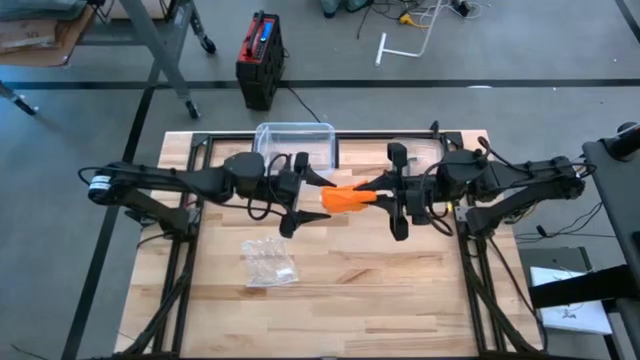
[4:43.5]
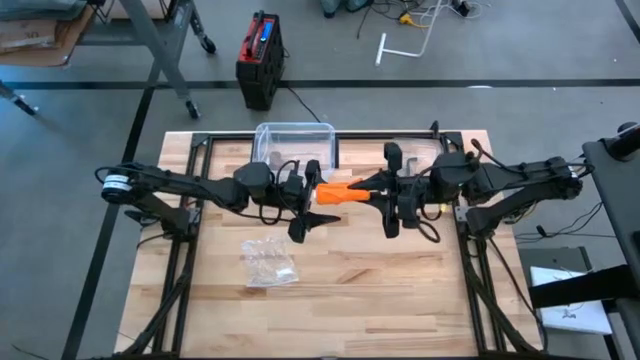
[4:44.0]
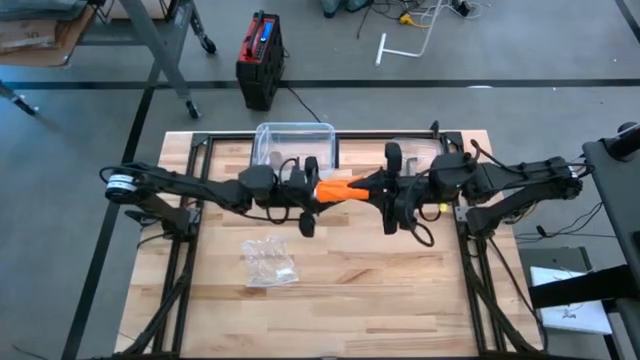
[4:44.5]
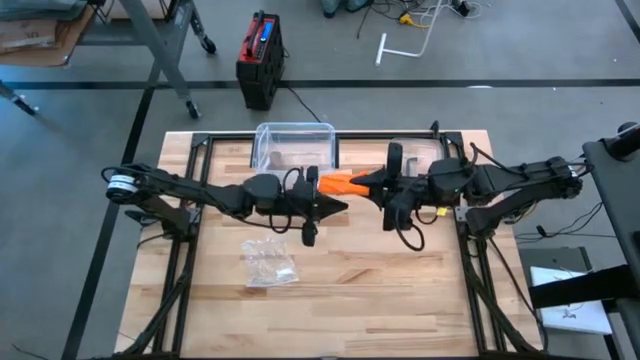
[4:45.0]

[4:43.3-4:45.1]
Task: Roll bandage
Roll the orange bandage

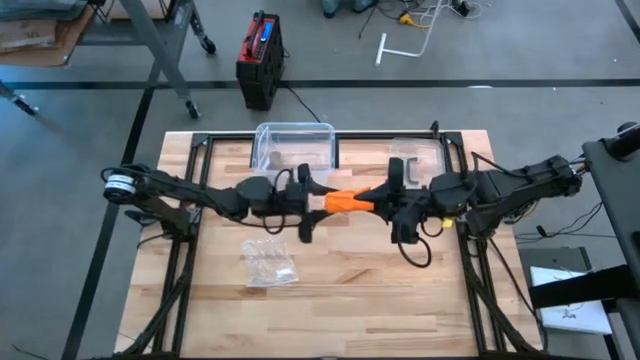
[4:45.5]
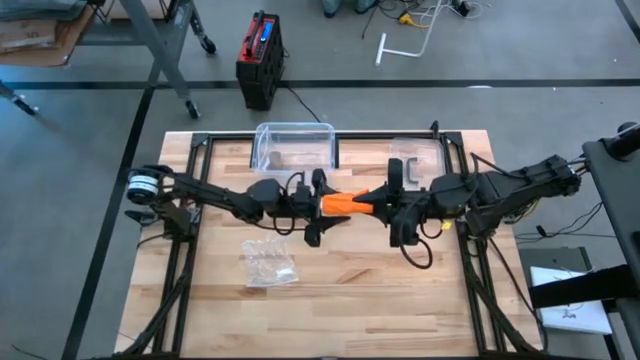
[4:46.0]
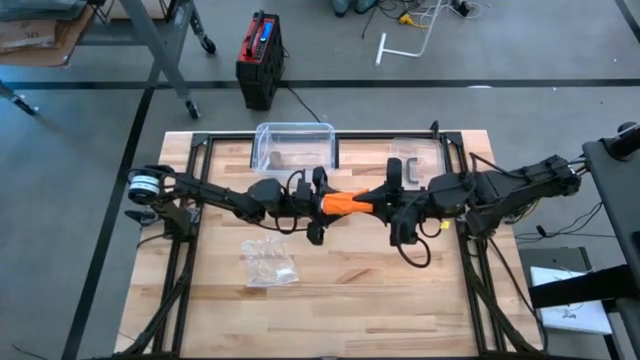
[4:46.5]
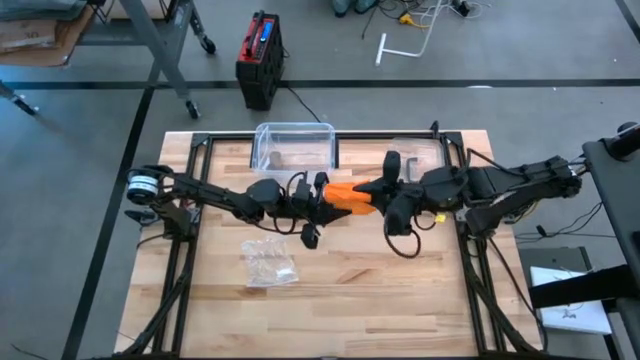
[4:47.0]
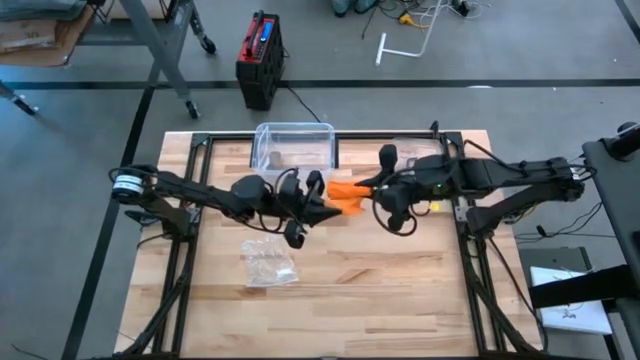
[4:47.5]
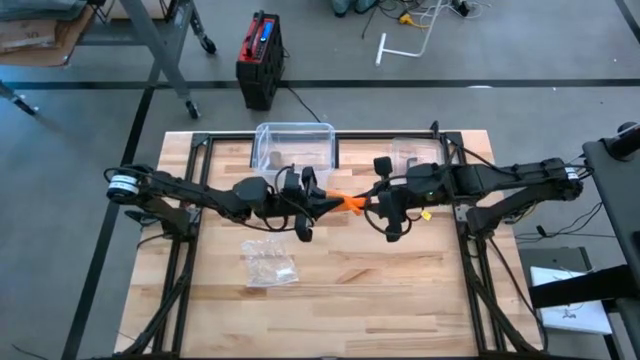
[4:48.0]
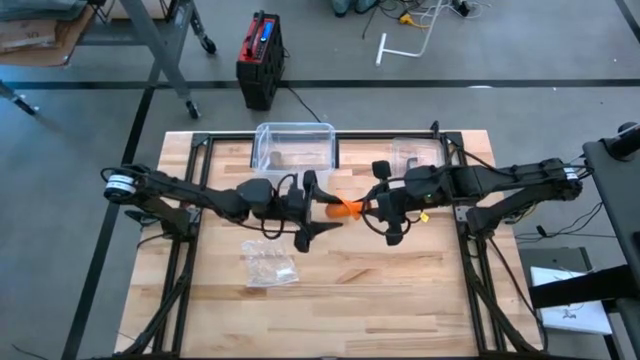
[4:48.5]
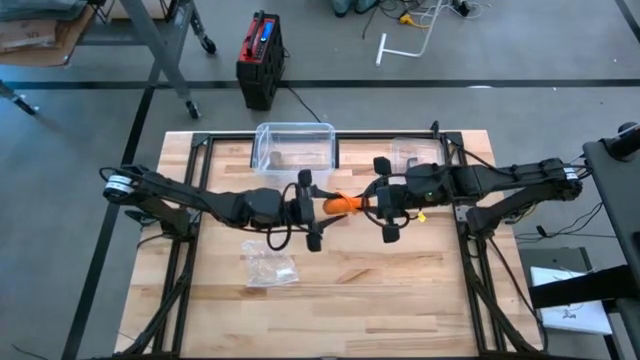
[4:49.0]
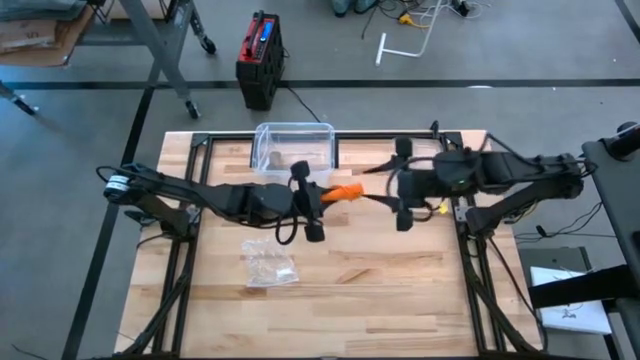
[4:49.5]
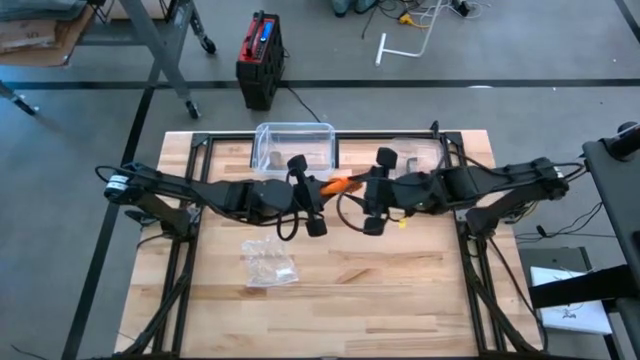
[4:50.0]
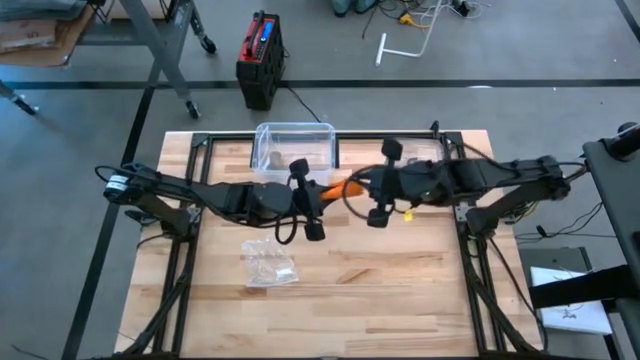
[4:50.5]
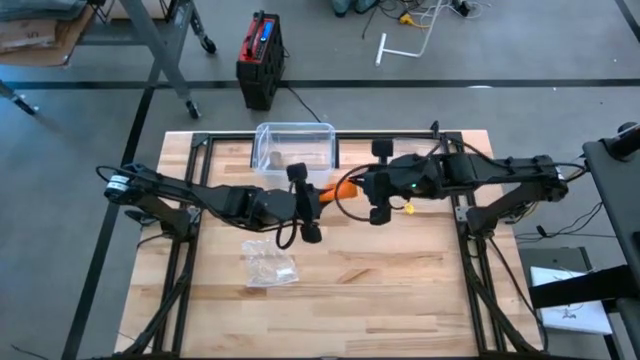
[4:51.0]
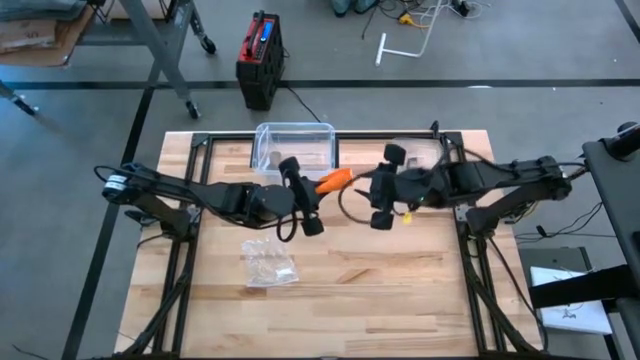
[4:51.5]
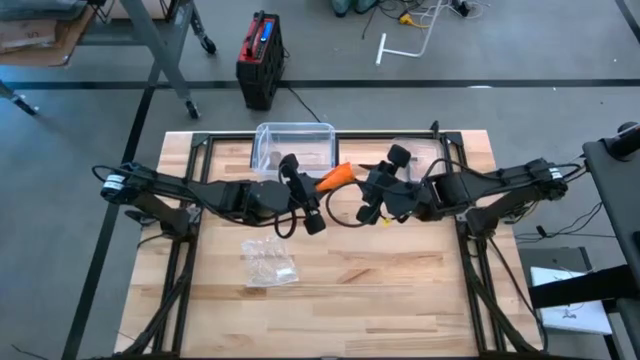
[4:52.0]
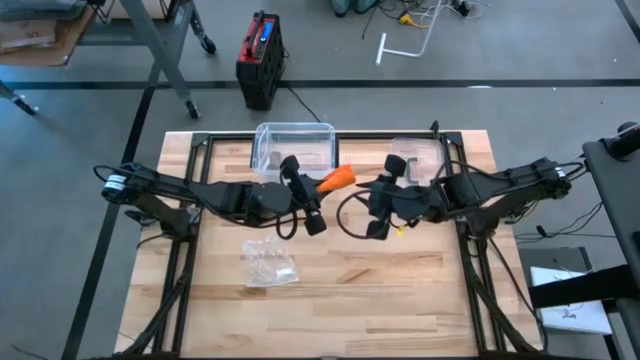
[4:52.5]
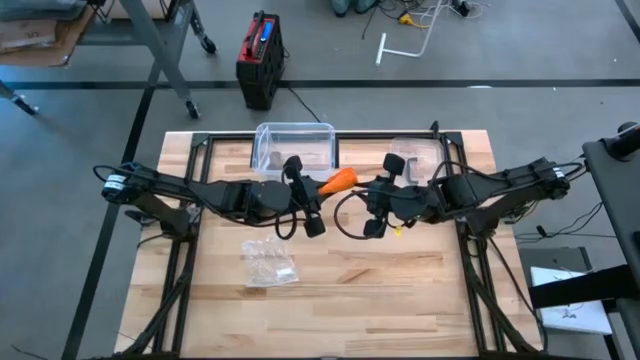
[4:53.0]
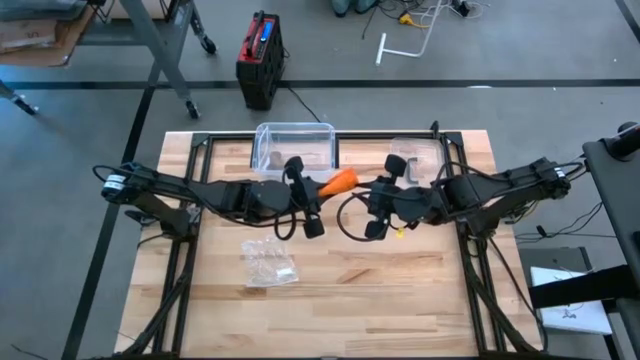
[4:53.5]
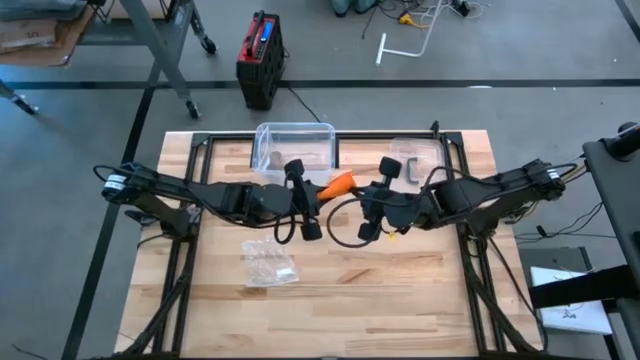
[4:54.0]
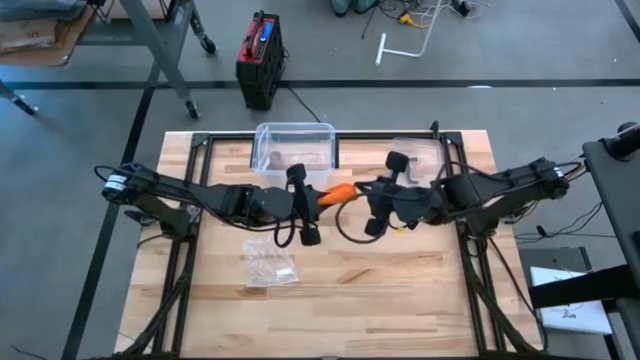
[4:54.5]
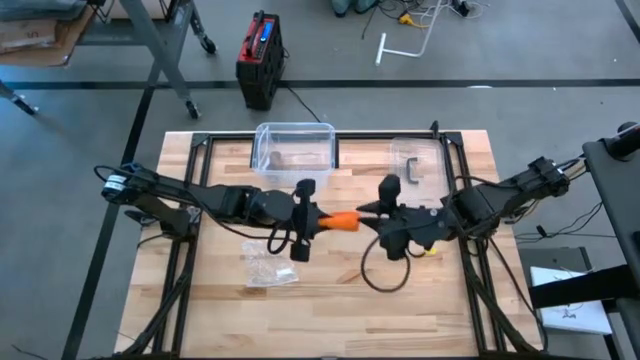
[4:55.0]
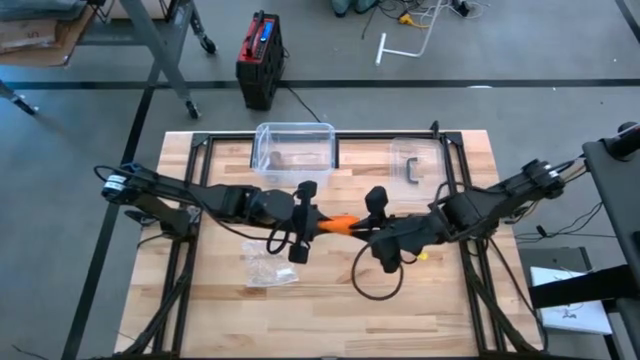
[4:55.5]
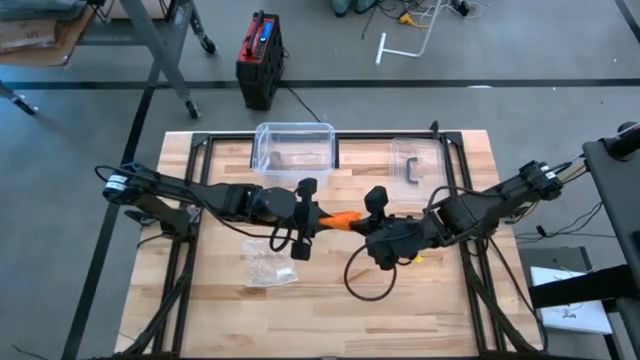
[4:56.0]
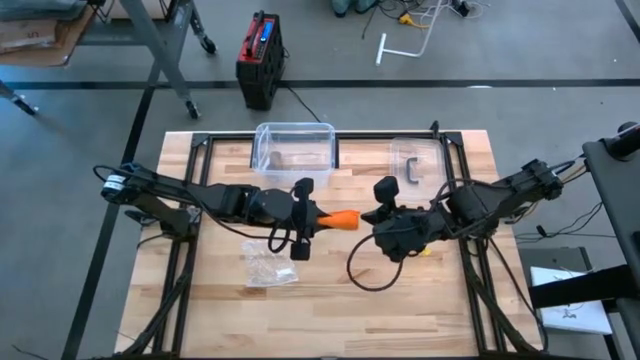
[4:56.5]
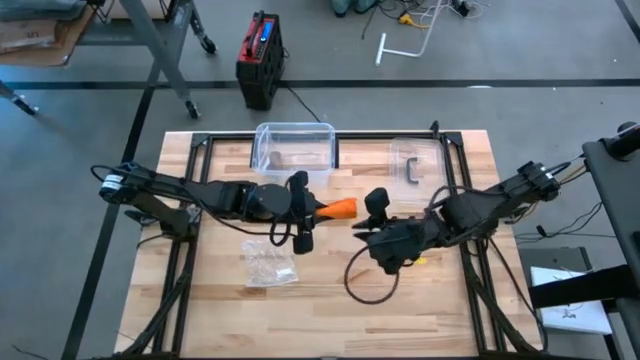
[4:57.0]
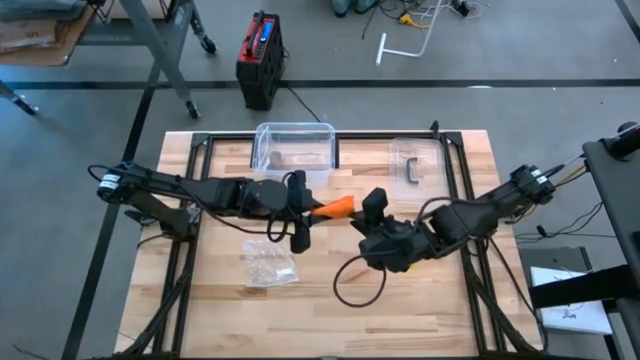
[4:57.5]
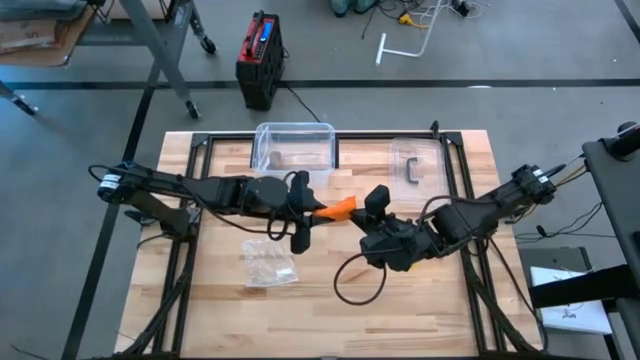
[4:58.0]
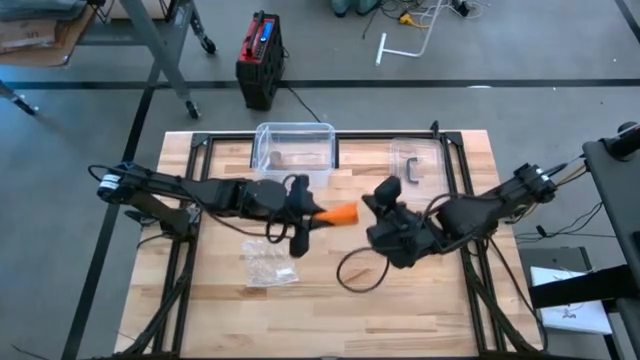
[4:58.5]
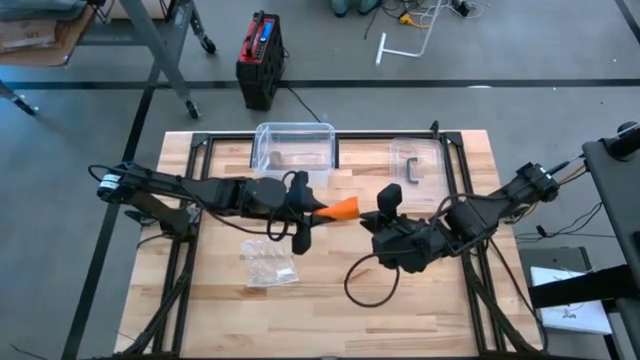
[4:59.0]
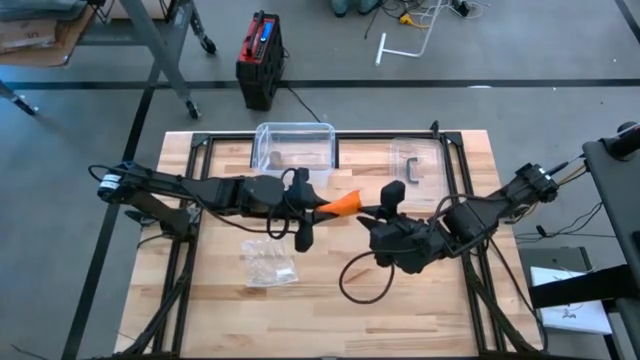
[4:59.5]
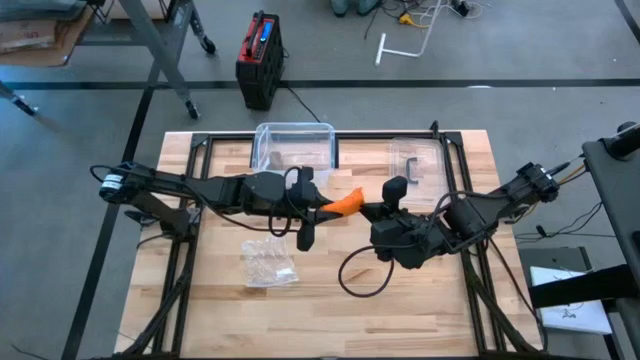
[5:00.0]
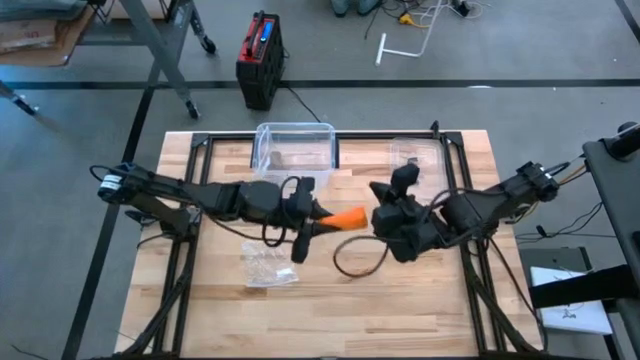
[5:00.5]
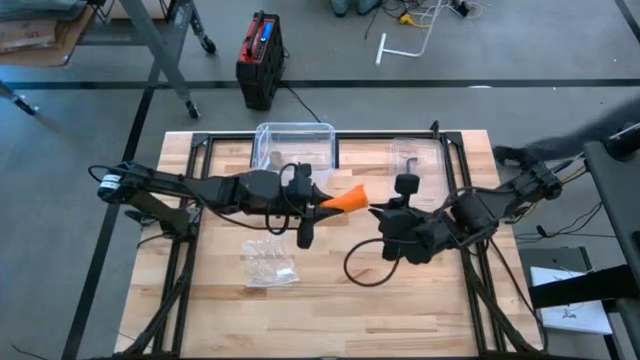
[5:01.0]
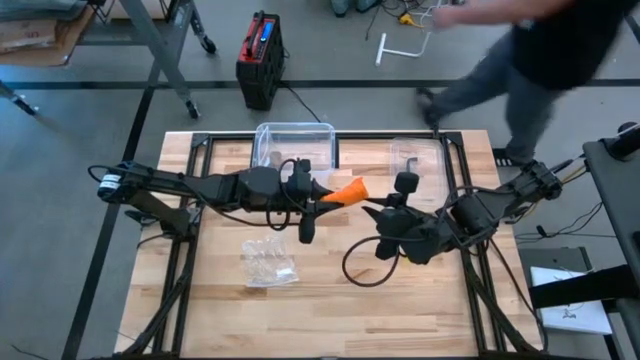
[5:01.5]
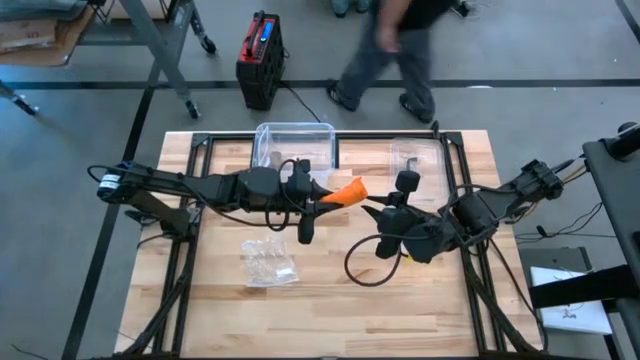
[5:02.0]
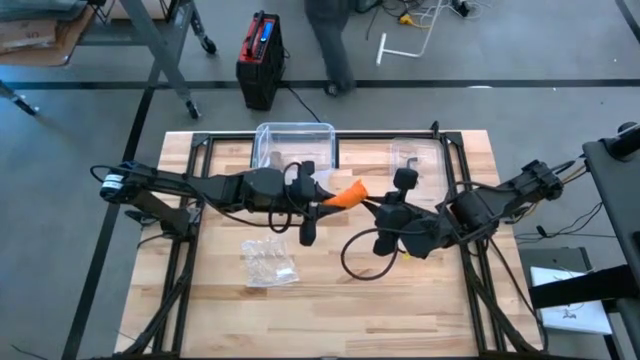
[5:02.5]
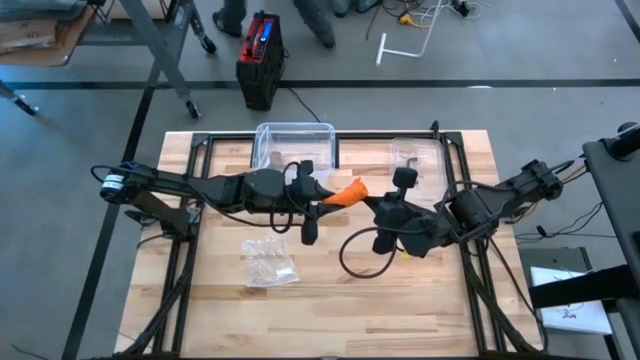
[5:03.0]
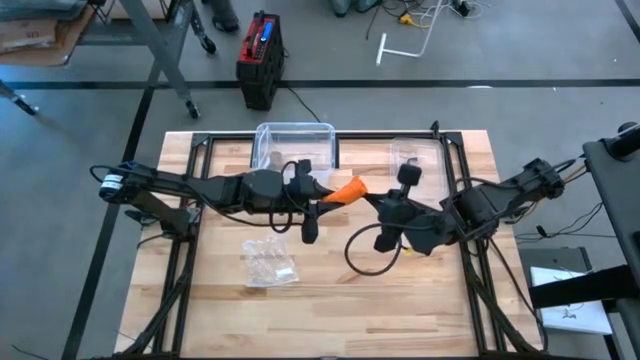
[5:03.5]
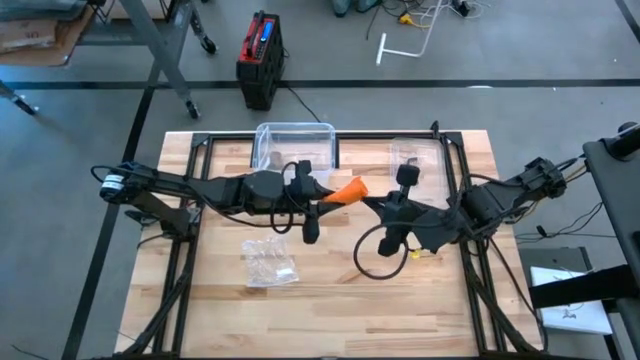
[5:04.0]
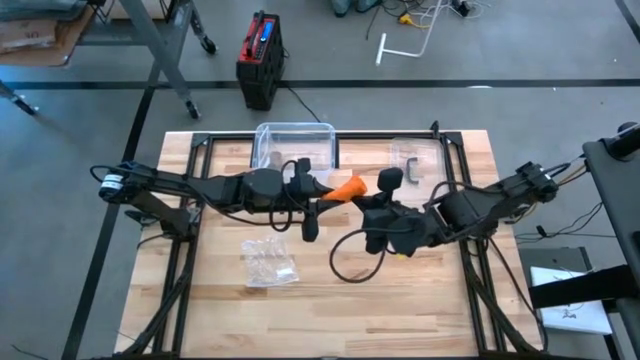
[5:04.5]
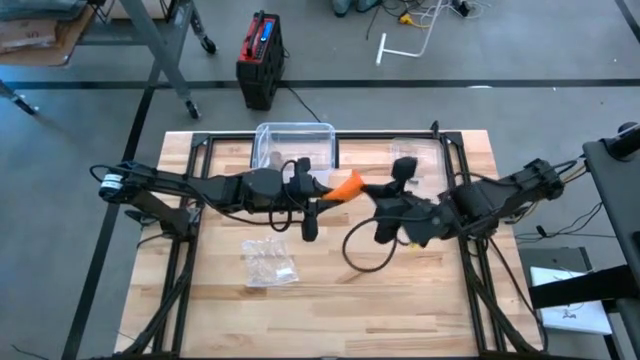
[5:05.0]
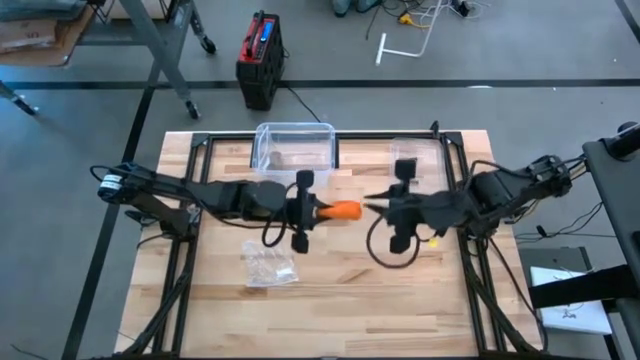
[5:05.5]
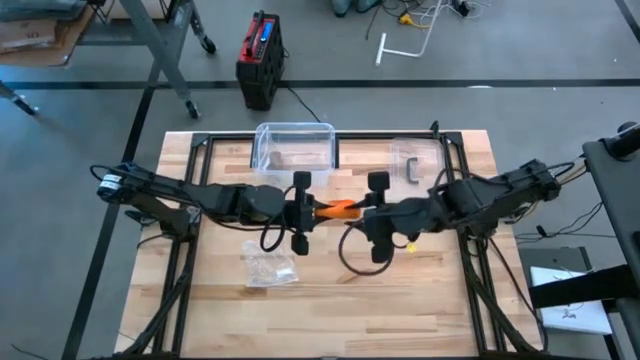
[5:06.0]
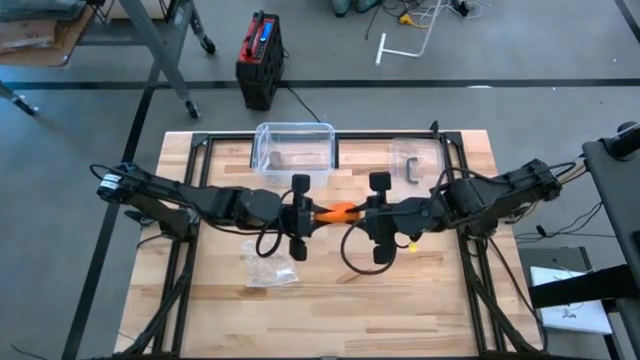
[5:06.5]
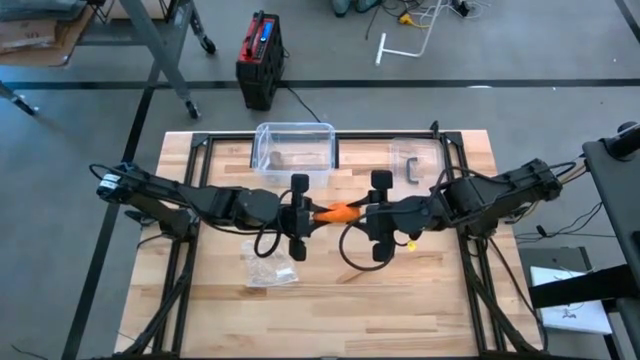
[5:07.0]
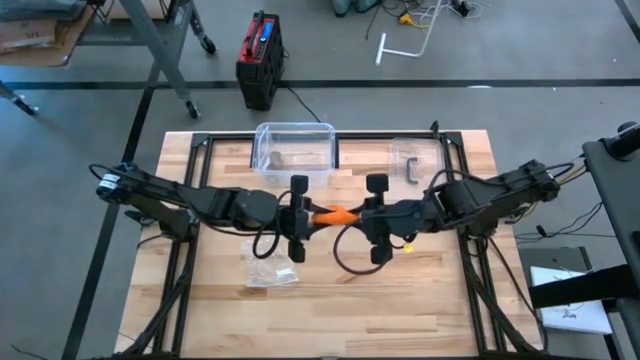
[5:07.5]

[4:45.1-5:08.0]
Roll the orange bandage
